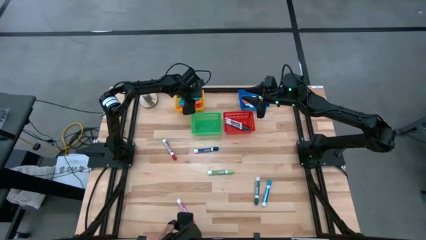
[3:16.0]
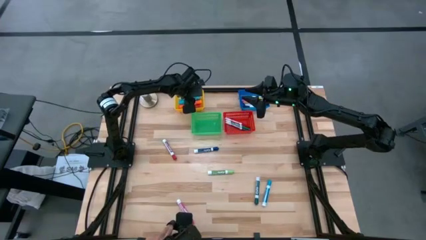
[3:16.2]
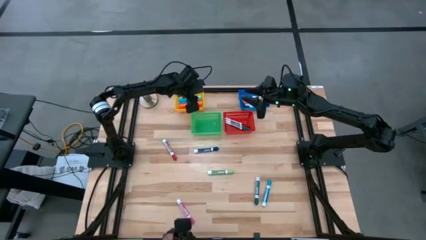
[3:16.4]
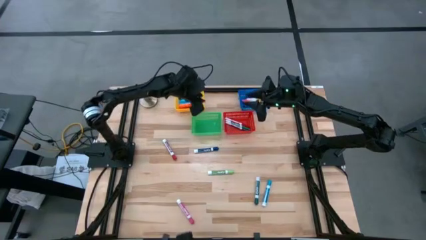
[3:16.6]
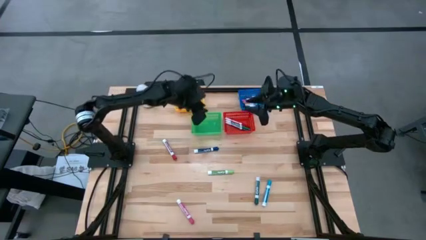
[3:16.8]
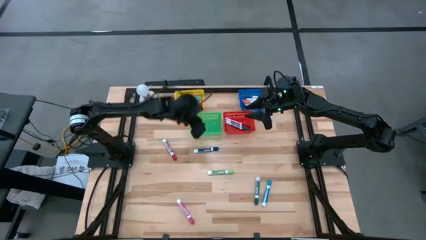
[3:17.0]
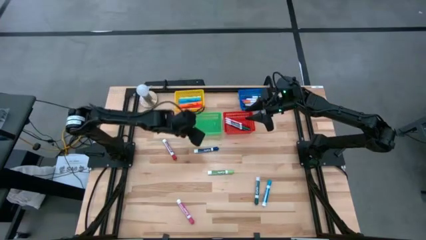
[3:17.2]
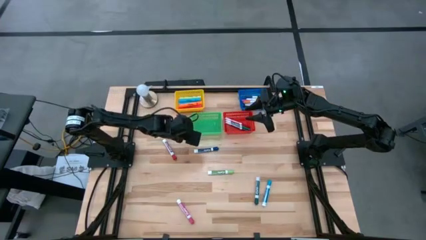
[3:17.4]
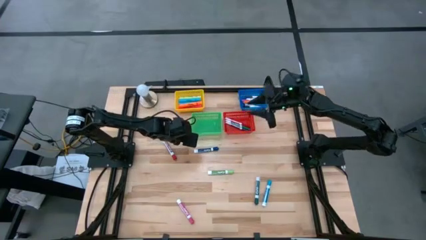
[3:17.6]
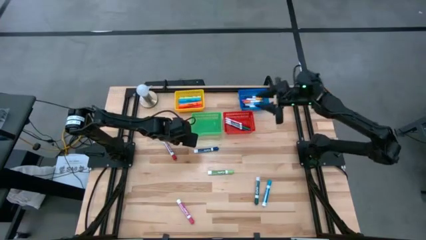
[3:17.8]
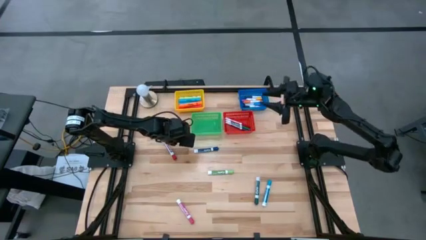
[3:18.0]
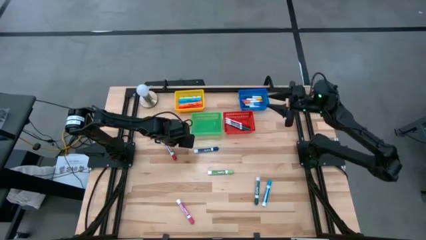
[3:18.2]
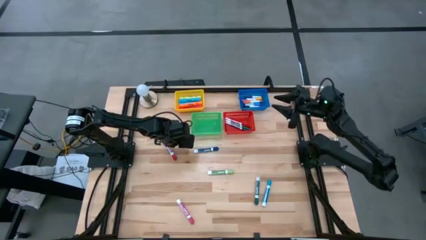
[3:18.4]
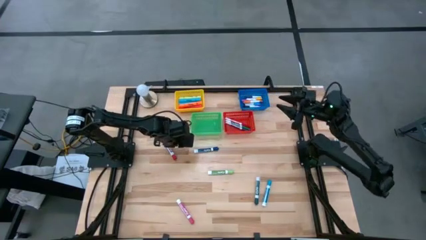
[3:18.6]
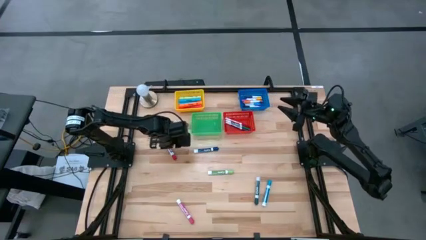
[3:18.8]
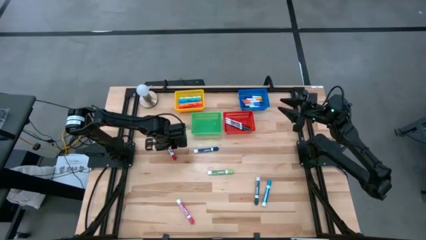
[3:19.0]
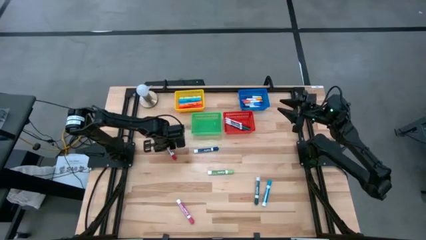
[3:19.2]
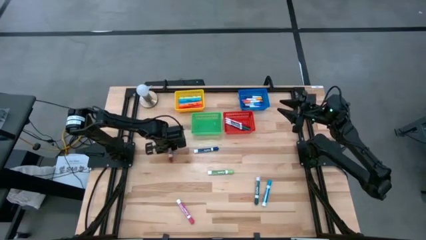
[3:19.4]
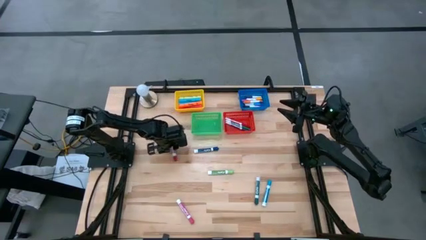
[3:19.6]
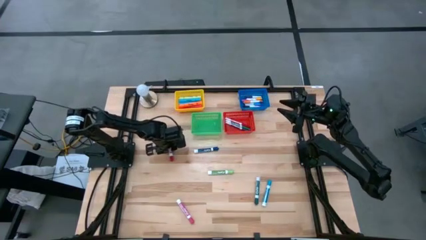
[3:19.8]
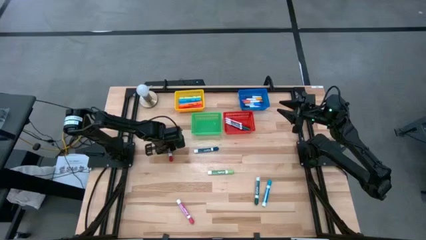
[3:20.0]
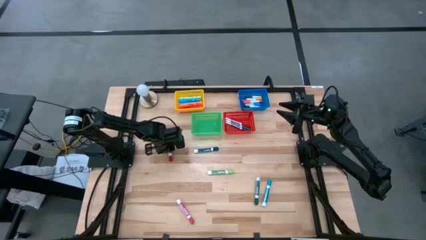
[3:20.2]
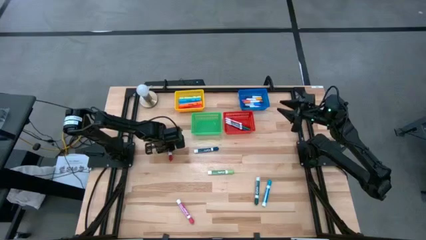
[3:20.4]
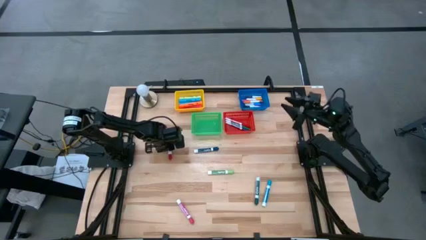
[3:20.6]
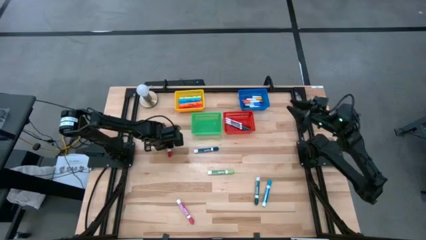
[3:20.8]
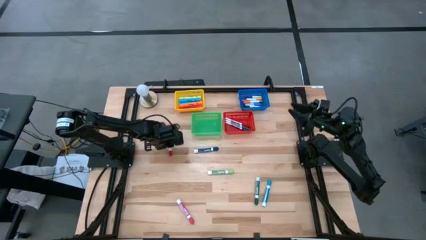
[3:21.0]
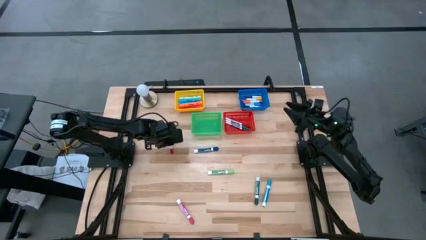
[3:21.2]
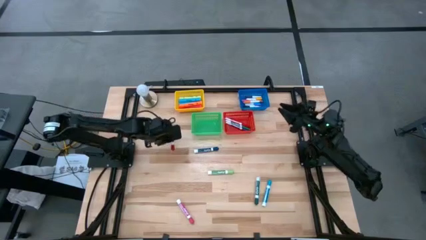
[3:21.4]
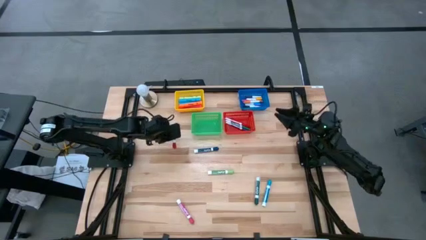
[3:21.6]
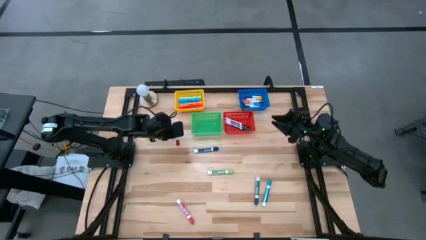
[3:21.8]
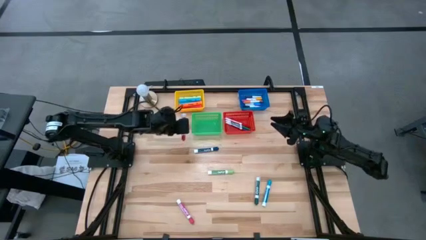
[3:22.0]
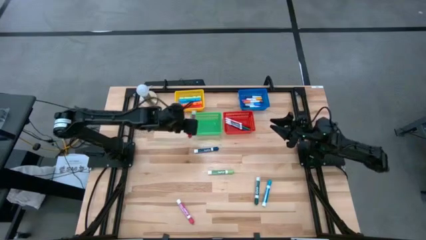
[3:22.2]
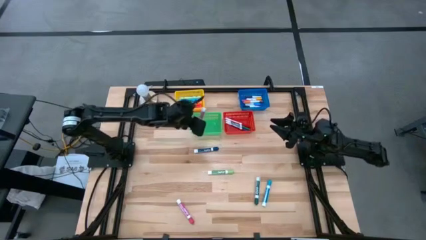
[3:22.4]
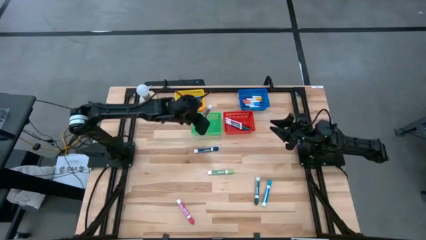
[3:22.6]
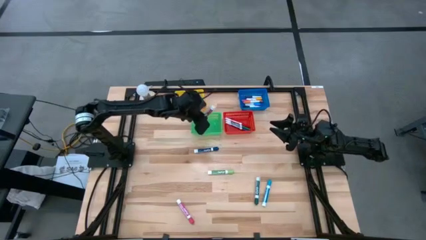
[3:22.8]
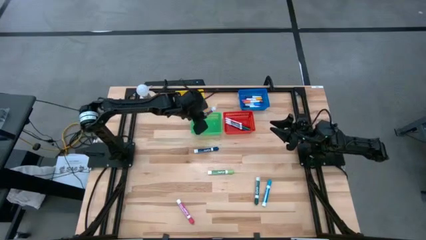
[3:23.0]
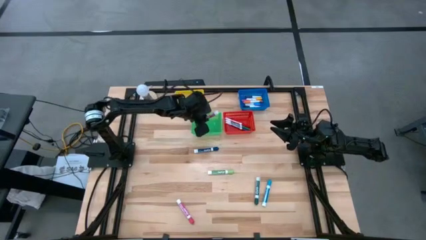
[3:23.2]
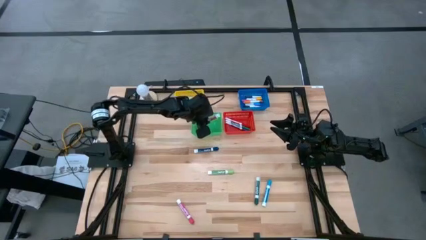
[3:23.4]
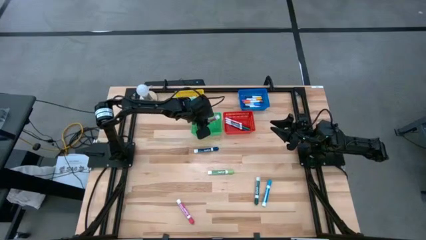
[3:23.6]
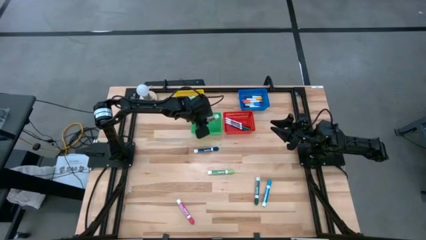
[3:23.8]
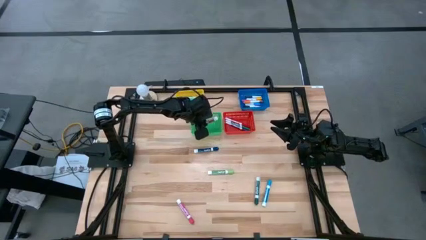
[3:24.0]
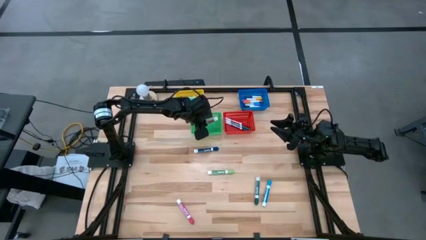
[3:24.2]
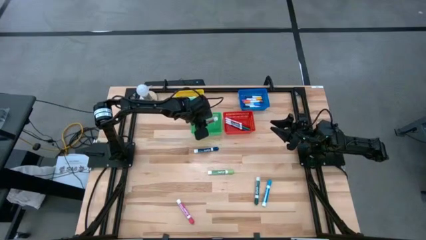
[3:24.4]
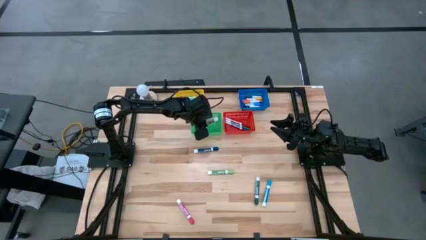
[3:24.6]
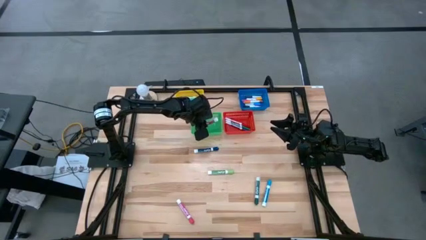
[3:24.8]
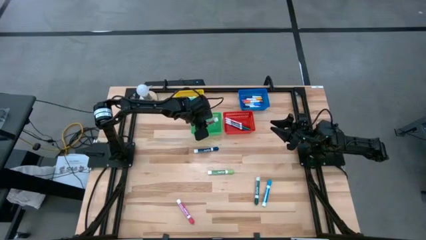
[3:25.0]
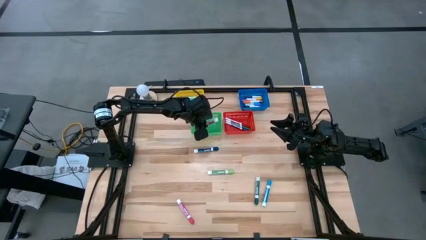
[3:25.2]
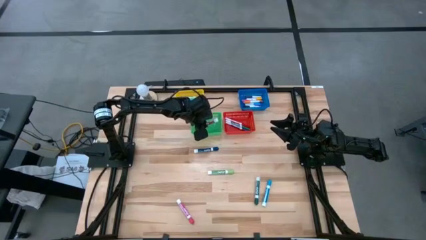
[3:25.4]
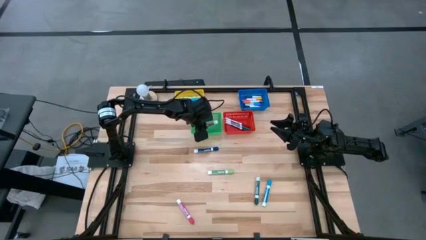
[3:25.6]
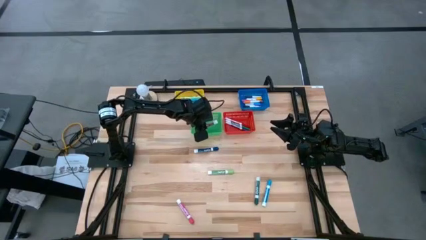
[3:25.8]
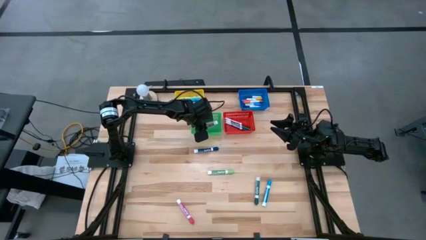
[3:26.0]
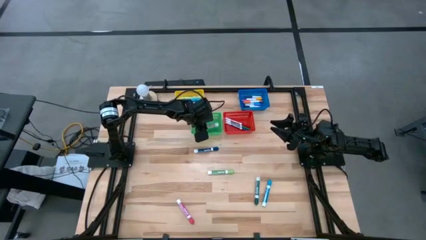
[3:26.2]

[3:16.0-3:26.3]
Task: Pick & Place Markers
Put the red marker into the green bin

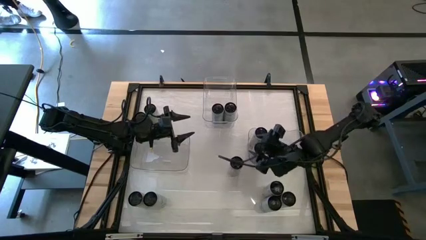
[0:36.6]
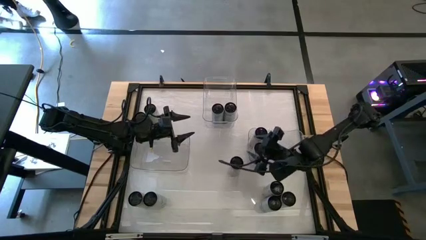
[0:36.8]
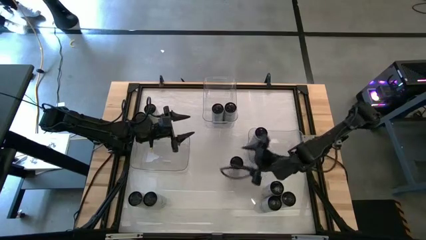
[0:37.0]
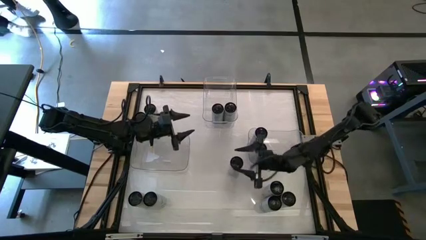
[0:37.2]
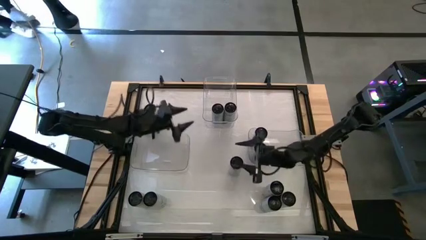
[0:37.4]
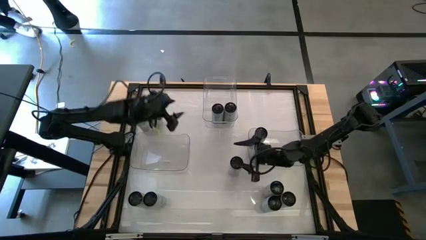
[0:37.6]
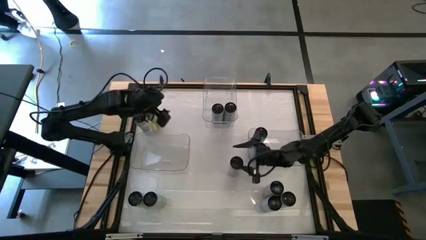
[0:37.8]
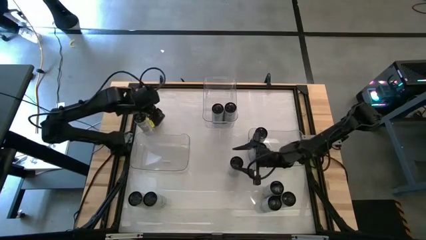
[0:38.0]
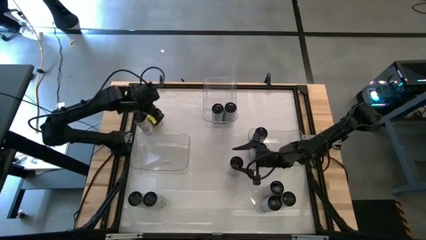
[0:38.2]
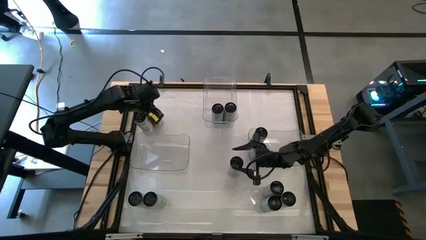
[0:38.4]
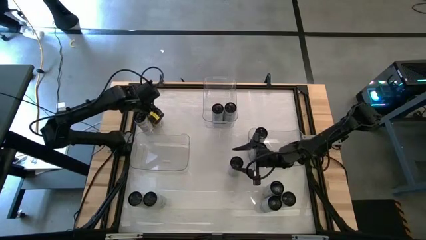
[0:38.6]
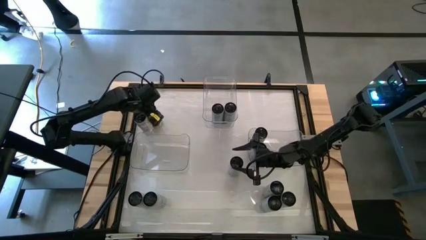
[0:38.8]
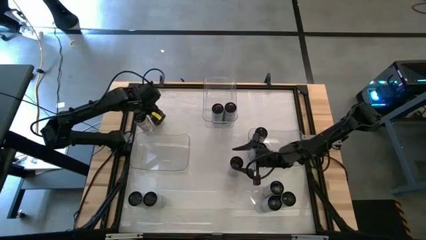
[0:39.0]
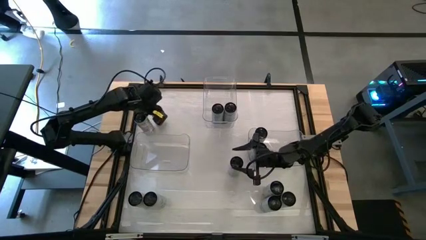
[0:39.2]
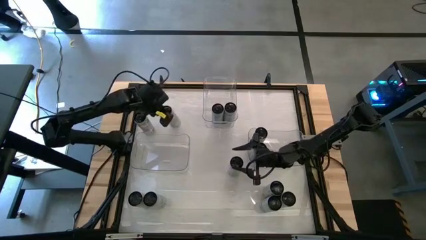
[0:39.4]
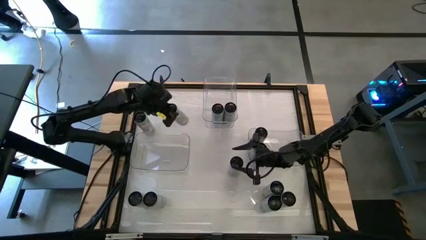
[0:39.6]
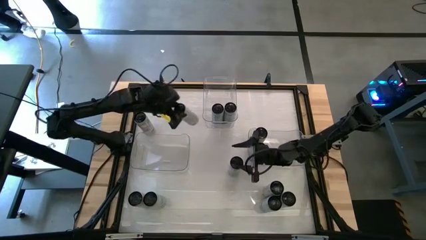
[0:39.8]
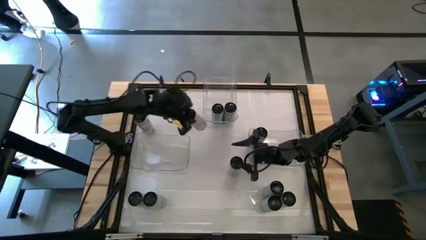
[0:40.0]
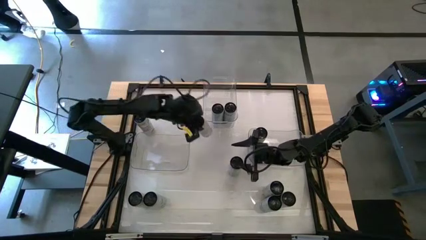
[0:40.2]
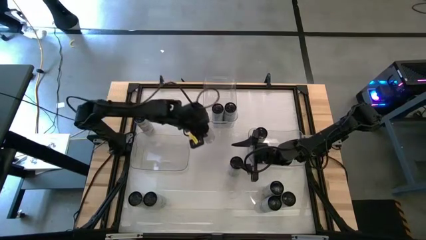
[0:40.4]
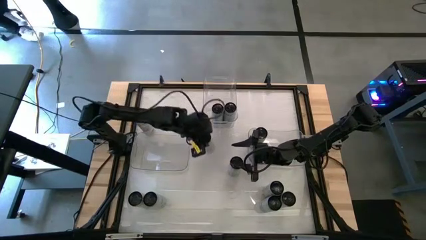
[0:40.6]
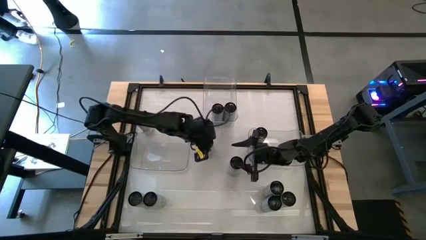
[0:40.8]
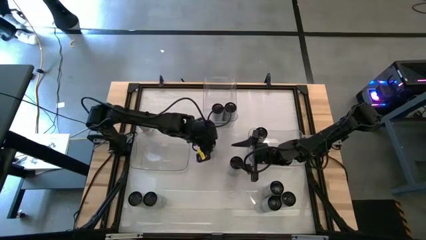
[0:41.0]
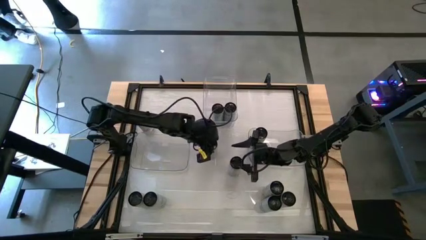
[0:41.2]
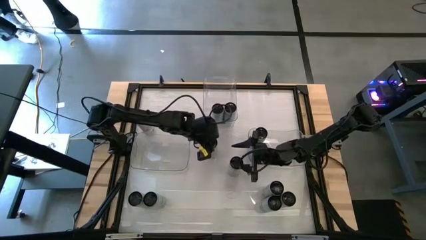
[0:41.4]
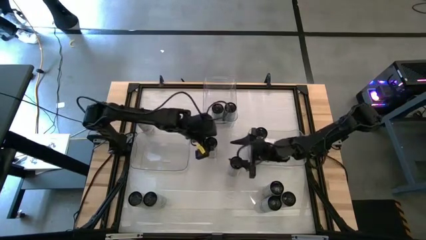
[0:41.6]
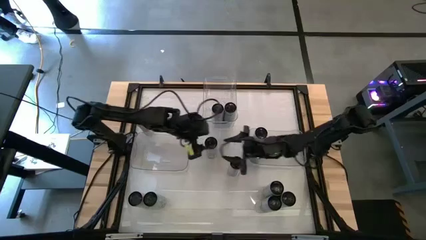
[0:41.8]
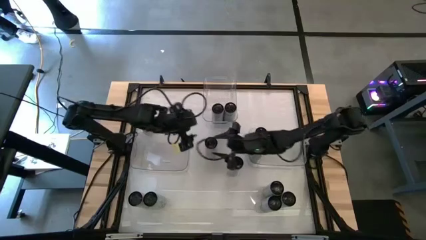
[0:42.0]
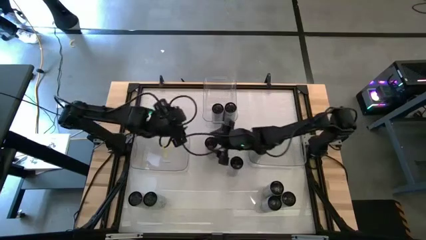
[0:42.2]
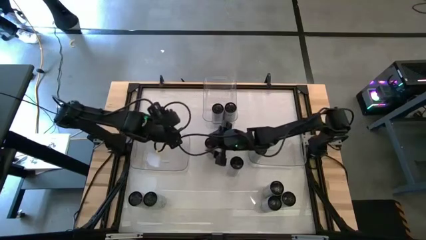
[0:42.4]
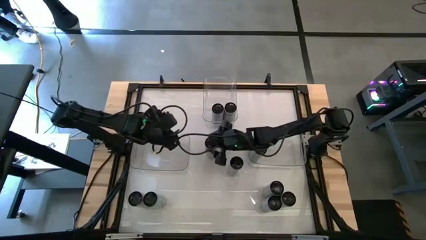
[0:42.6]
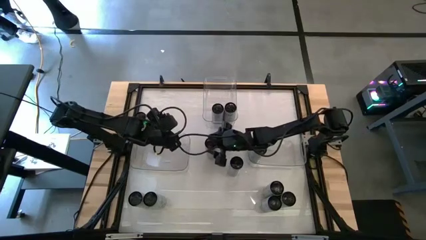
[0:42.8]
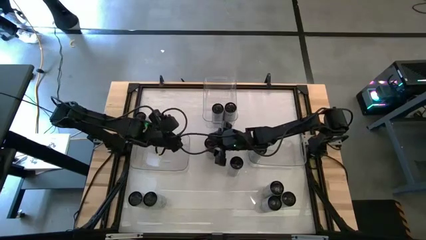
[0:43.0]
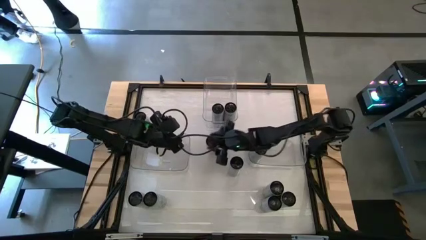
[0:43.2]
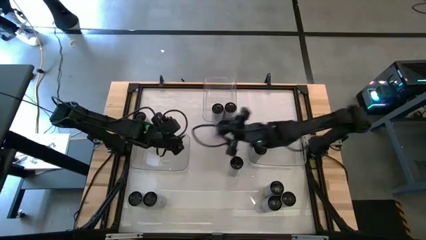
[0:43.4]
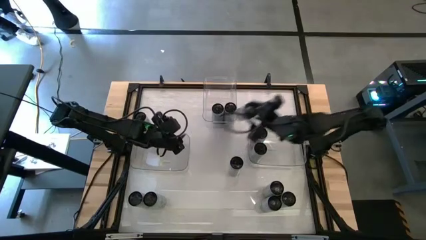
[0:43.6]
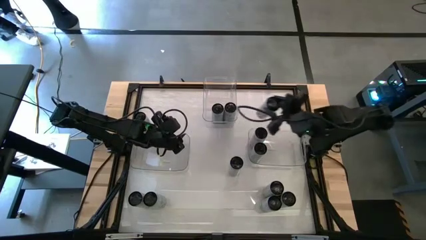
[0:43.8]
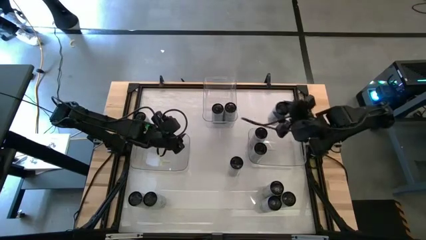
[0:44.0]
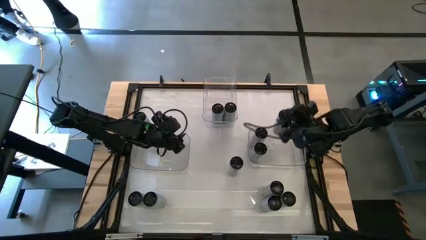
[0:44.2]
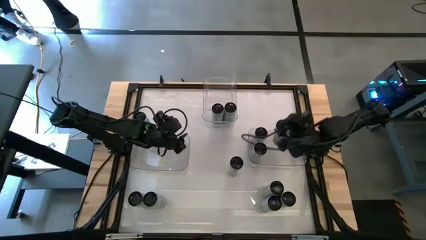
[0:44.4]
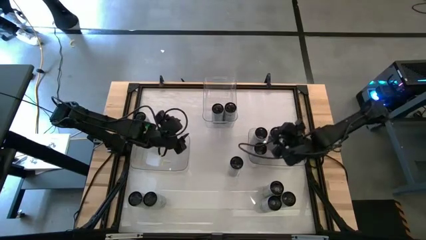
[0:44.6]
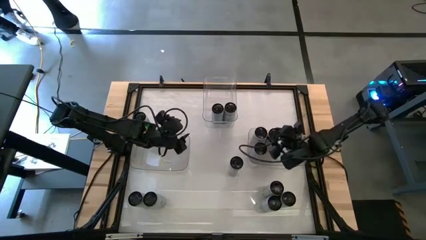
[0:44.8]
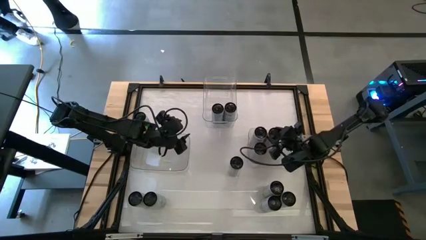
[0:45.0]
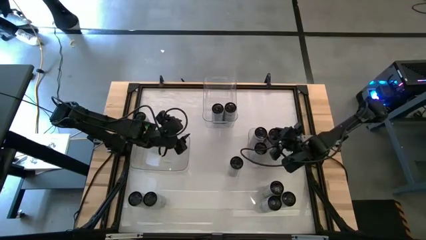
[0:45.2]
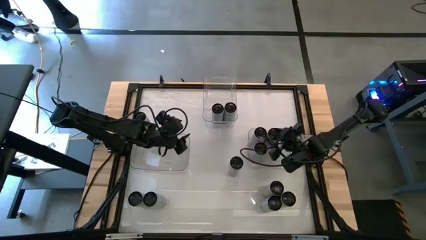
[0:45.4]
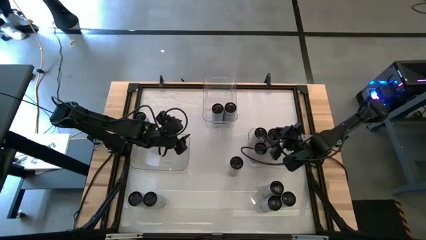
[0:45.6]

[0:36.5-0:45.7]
Task: Sort soda cans
Put the top white-yellow soda can into the bottom right transparent bin
